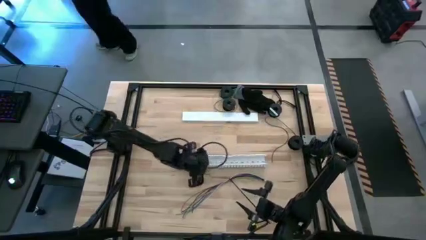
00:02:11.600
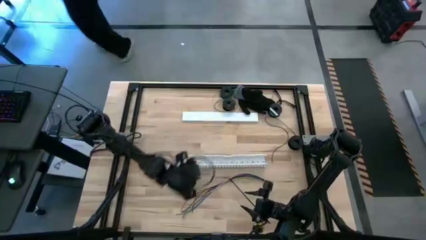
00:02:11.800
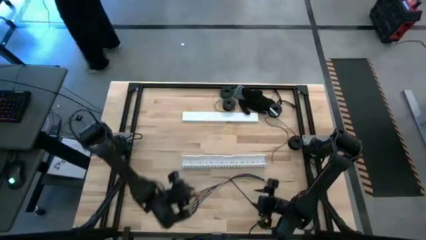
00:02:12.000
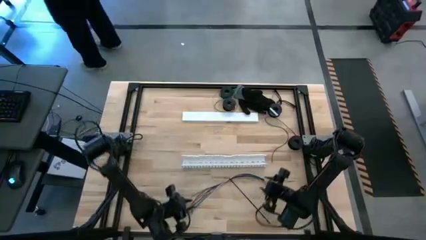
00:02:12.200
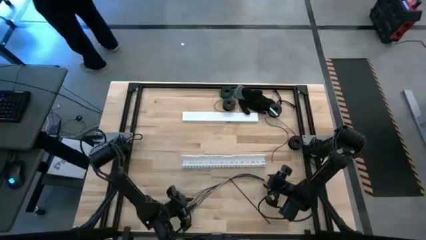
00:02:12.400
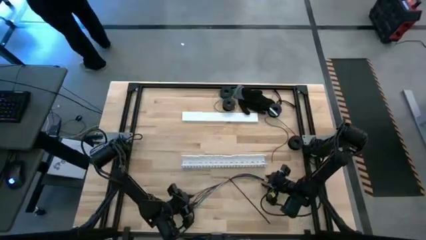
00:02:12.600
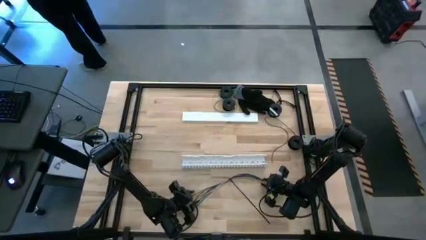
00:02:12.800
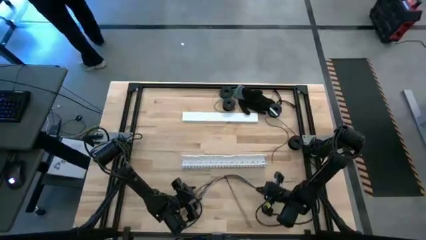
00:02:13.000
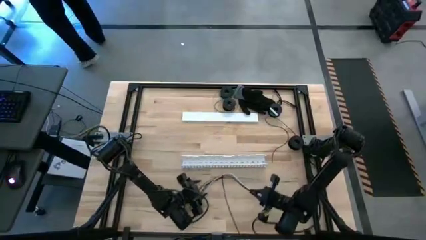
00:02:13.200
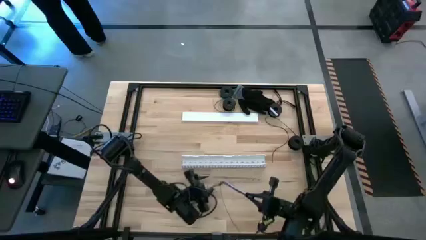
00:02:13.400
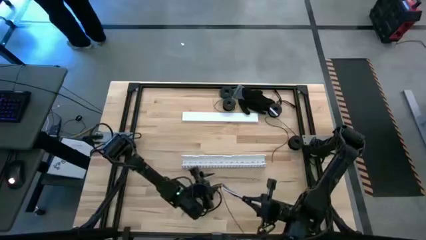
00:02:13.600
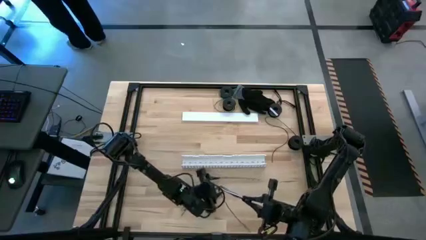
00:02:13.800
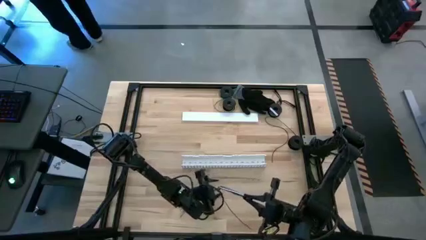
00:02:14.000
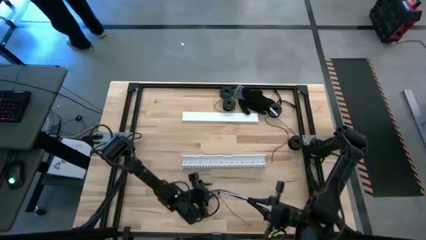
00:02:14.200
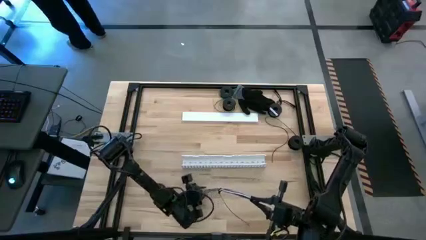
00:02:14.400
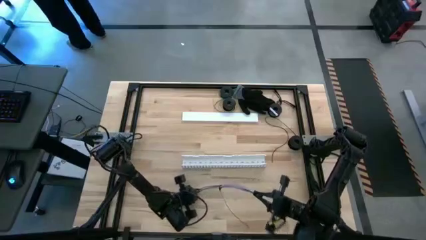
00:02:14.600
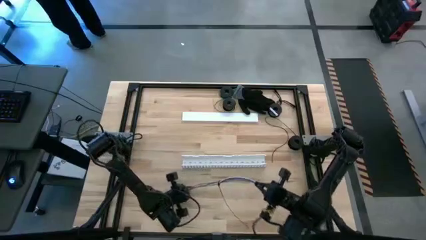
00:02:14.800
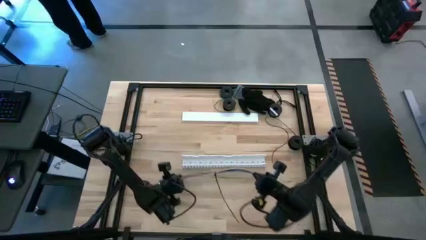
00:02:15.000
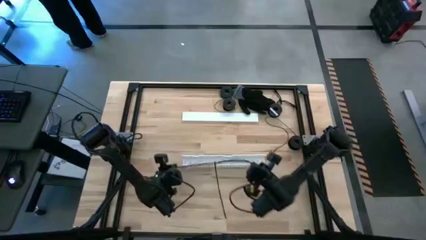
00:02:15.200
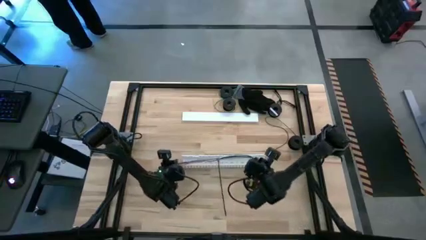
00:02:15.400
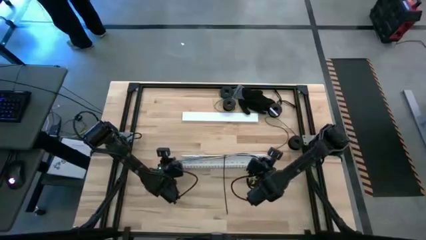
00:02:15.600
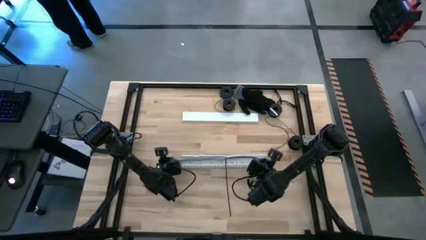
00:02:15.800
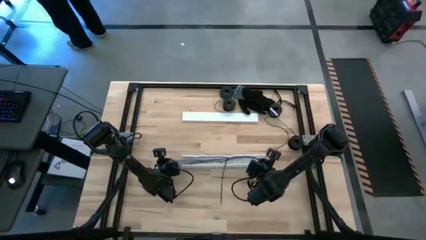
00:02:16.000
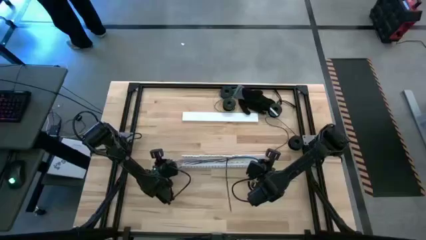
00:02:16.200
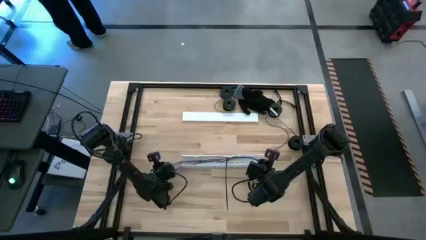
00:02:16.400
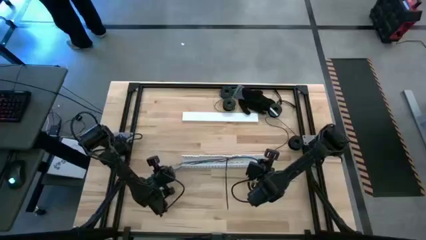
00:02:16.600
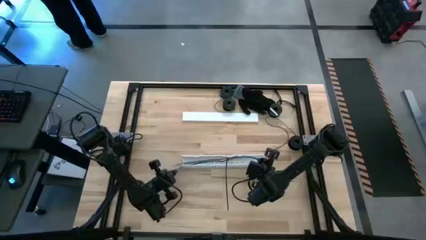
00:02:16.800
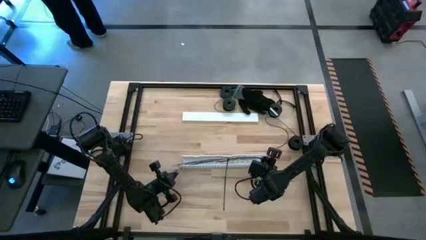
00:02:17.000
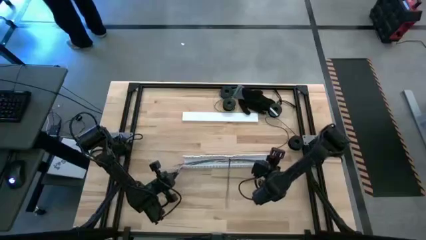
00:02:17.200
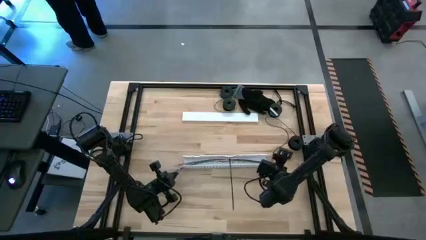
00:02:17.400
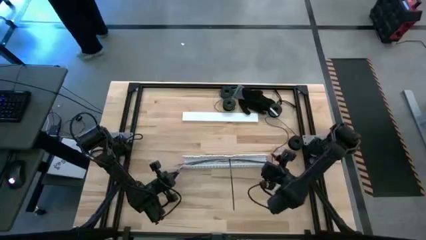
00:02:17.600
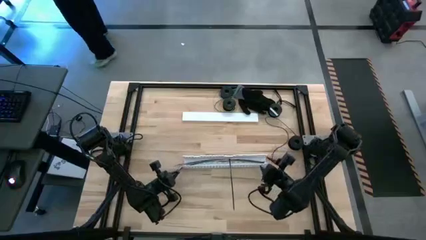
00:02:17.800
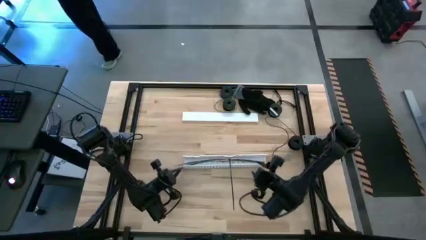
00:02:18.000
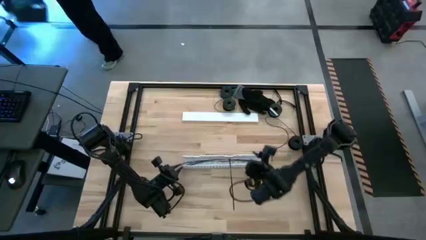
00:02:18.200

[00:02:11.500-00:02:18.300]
Task: Ziptie cables
Put the zip-tied cables into the white cable duct

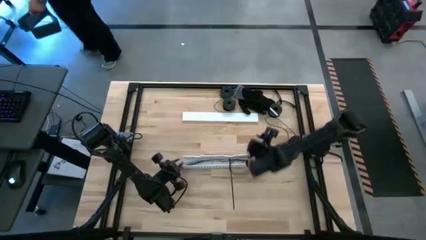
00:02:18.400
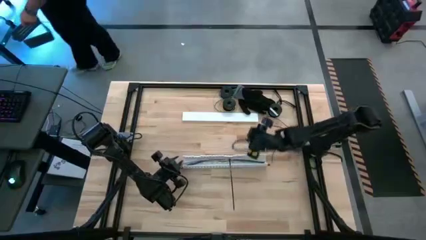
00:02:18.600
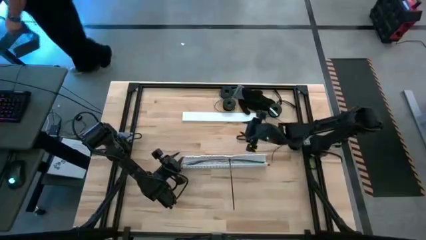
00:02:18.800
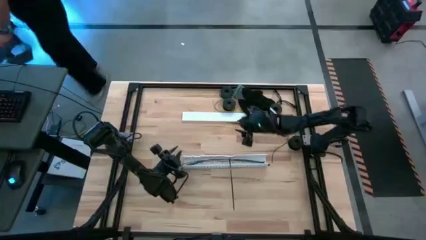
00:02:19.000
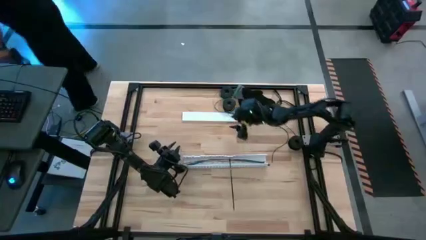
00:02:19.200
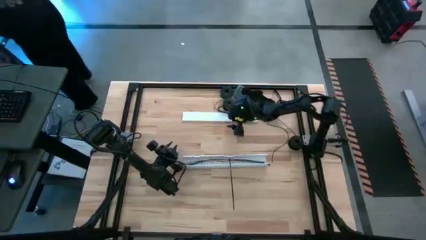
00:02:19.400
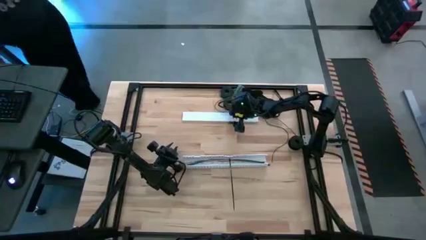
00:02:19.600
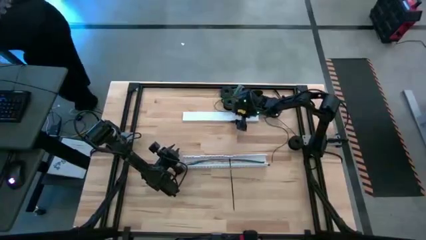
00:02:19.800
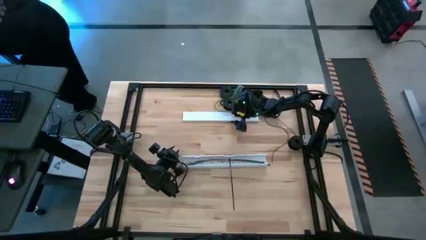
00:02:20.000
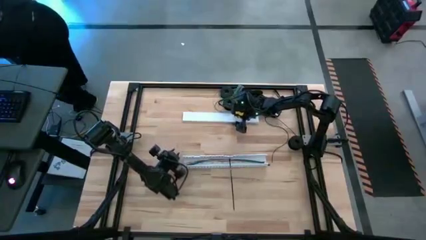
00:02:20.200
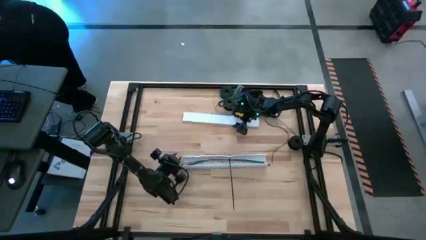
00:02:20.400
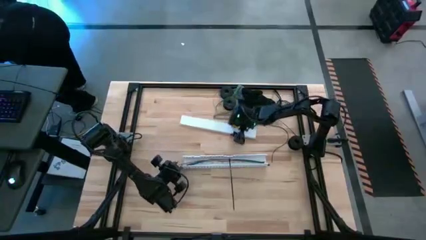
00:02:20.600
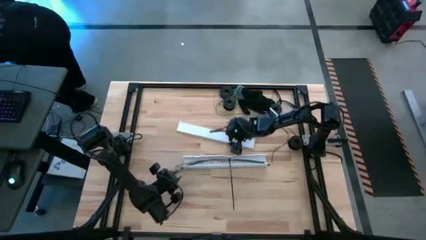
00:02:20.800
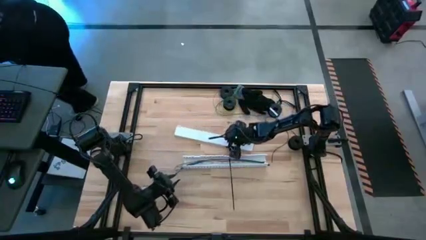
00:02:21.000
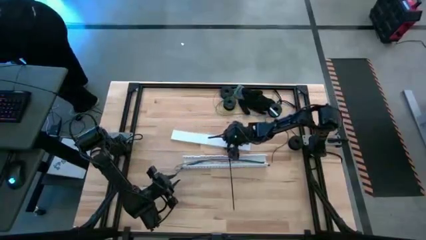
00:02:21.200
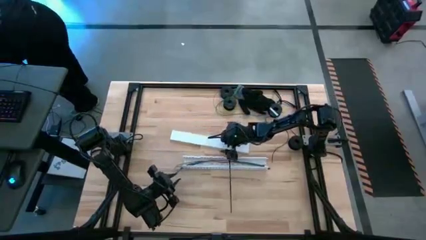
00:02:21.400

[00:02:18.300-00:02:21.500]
Move the zip-tied cables to the center of the table

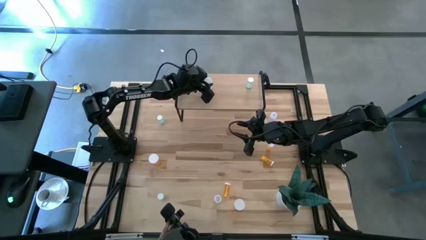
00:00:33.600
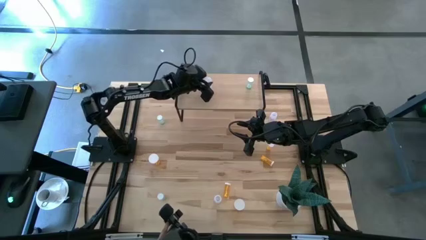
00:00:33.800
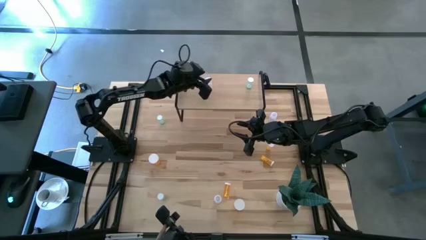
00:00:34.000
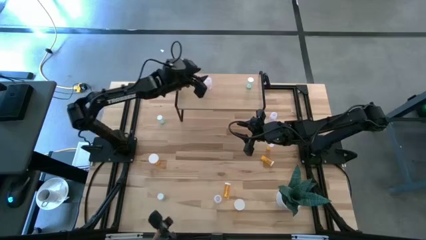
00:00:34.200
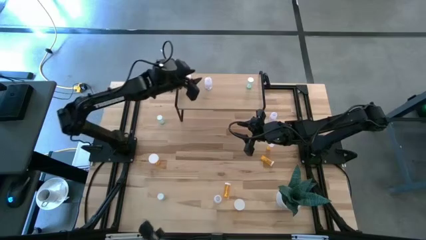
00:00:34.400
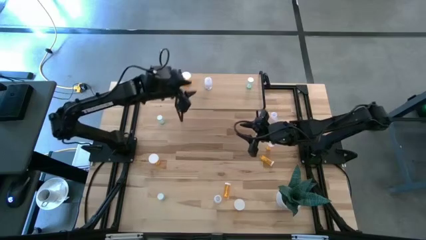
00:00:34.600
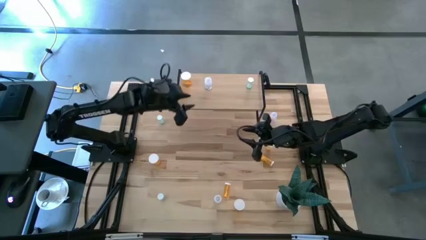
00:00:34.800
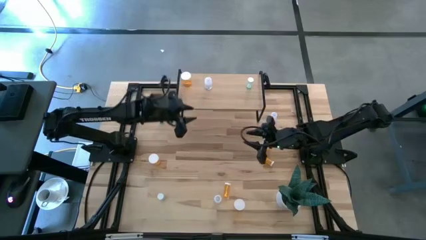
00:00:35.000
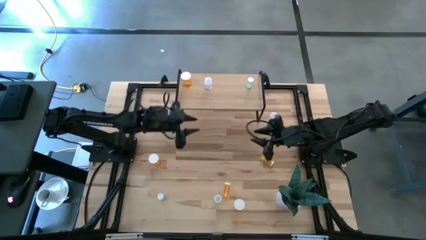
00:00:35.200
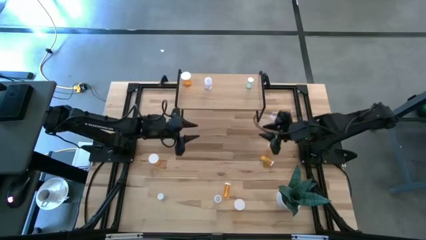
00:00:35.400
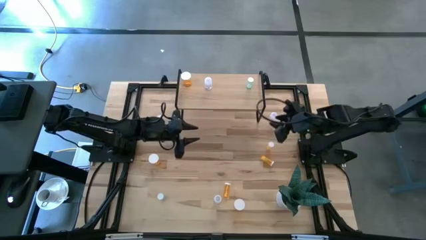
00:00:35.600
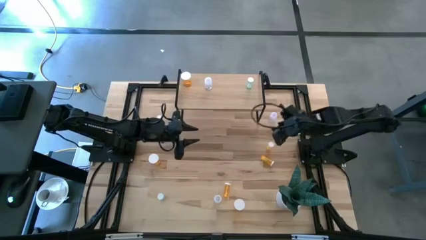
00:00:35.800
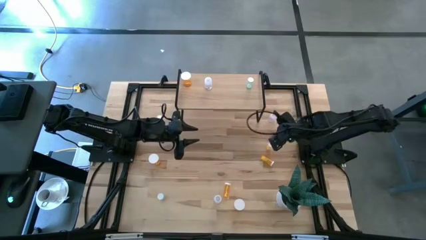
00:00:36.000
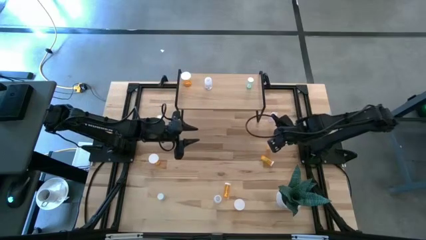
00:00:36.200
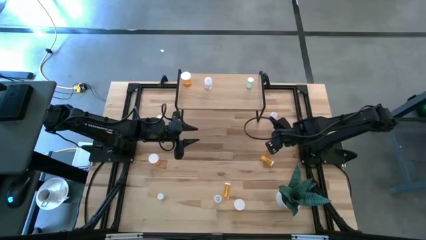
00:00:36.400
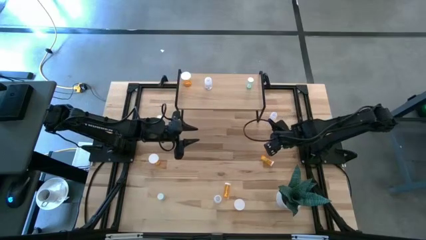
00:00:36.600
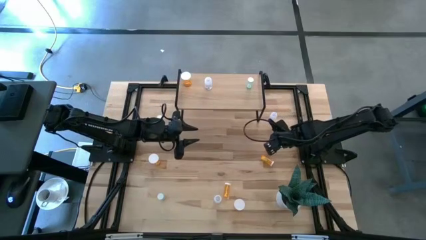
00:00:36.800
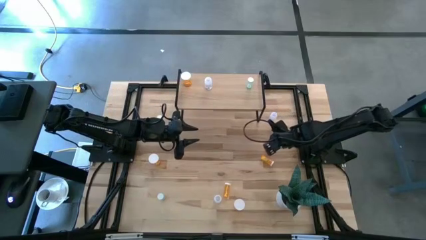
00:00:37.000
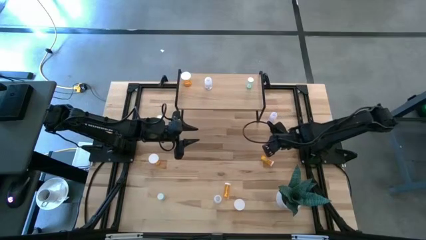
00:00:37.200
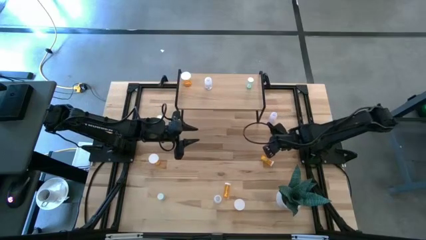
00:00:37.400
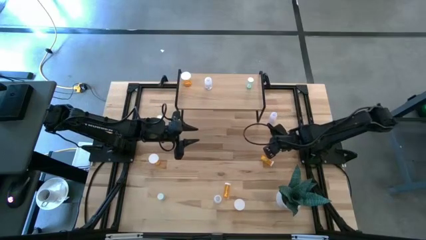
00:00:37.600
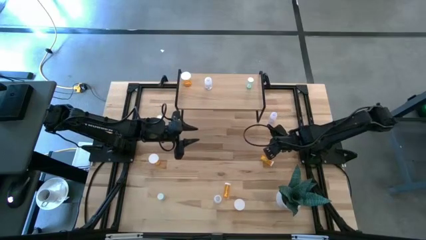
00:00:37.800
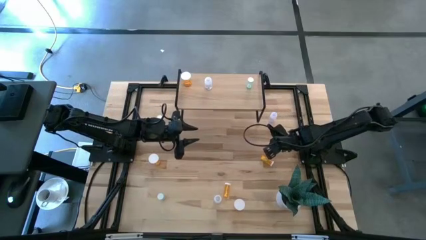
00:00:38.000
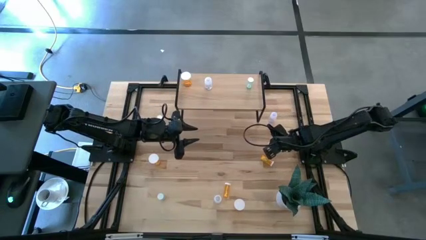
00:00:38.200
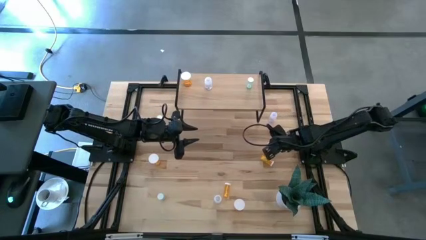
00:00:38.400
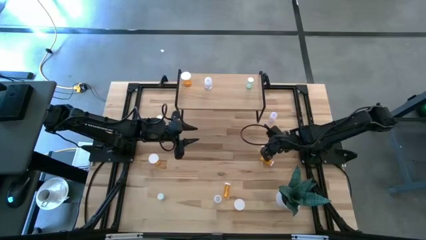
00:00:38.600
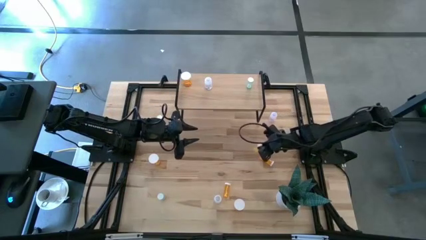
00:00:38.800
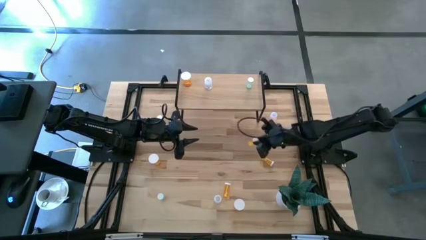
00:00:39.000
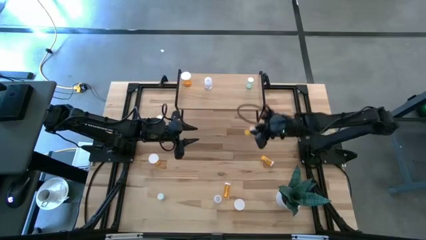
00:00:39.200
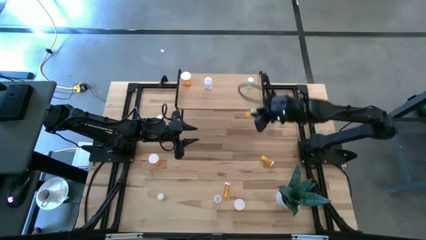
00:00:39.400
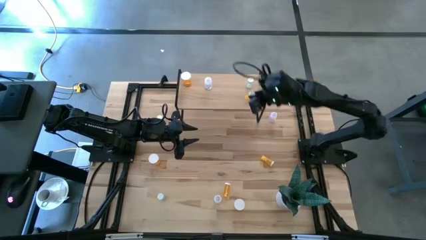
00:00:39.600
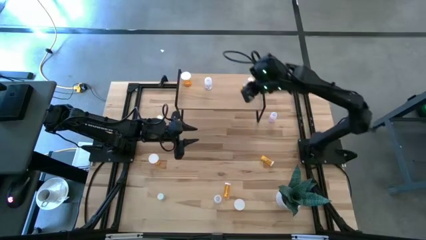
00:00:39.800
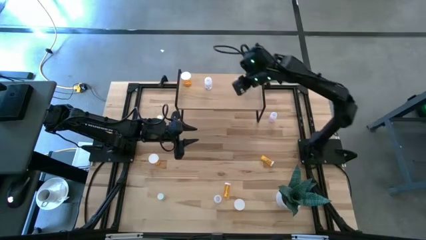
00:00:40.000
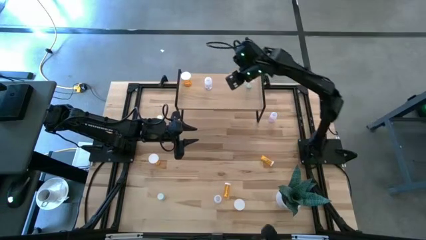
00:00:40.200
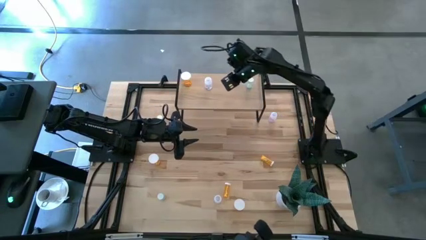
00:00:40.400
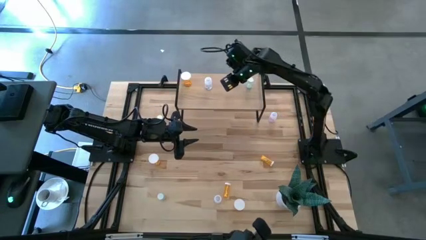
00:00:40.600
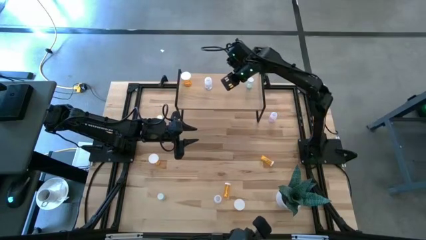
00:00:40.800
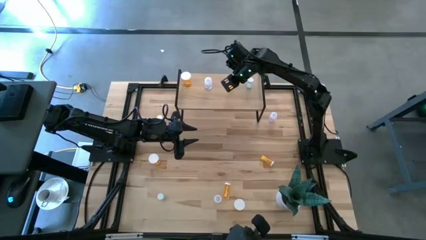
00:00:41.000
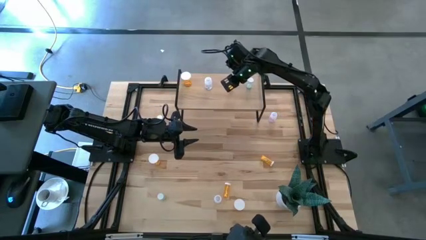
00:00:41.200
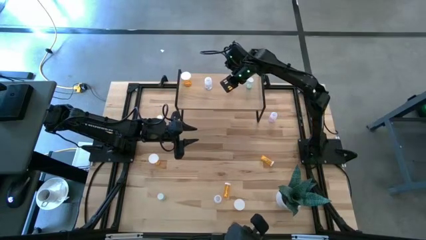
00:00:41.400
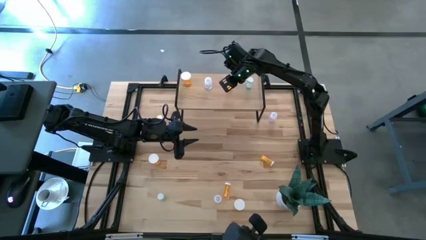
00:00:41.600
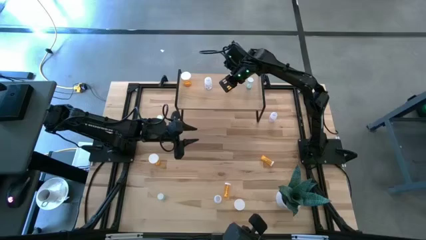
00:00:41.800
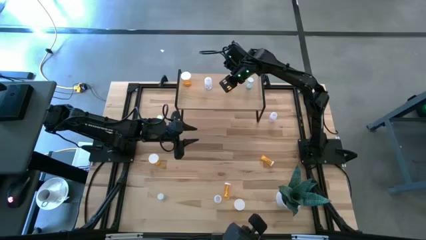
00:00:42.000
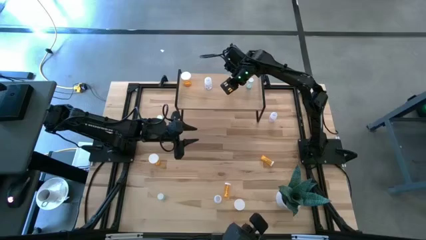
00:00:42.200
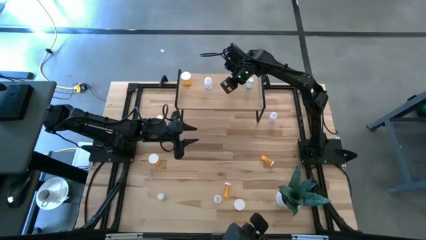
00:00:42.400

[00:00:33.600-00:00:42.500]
Task: Pick and place medicine bottles onto shelf by color
Put the top right orange pill bottle on the shelf
